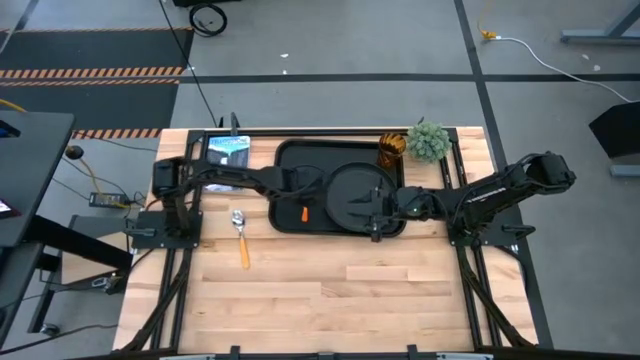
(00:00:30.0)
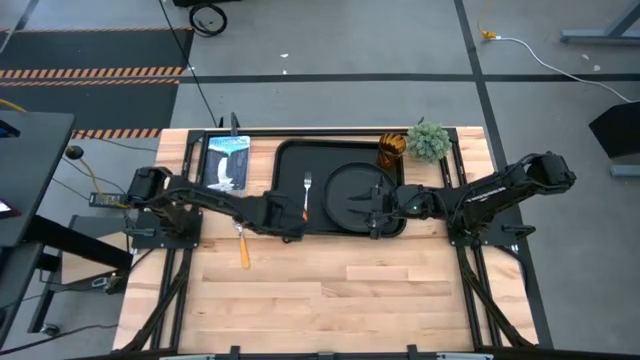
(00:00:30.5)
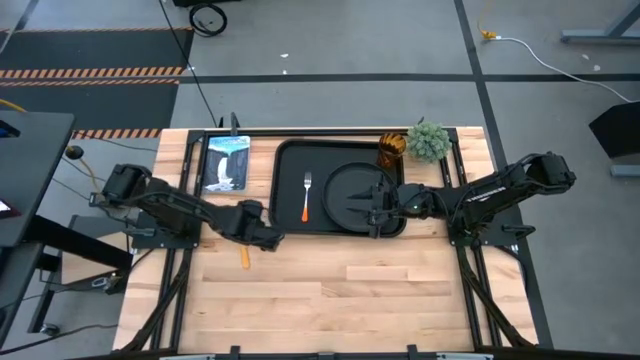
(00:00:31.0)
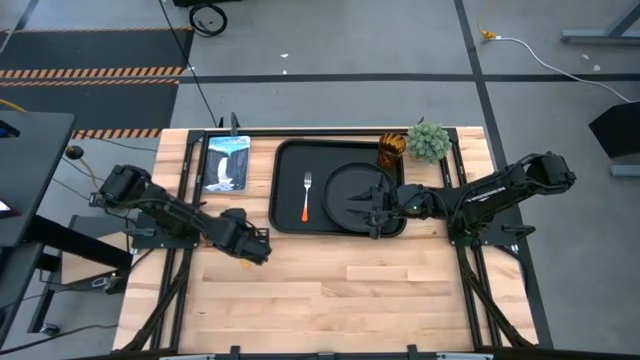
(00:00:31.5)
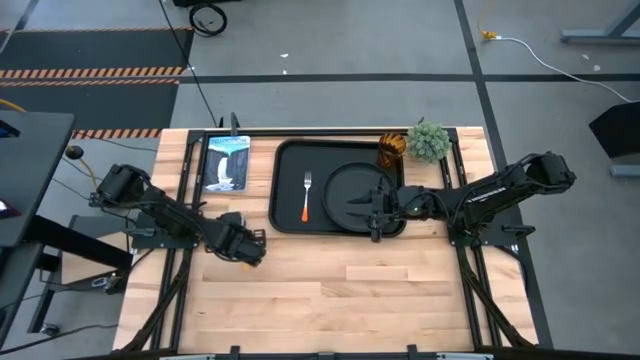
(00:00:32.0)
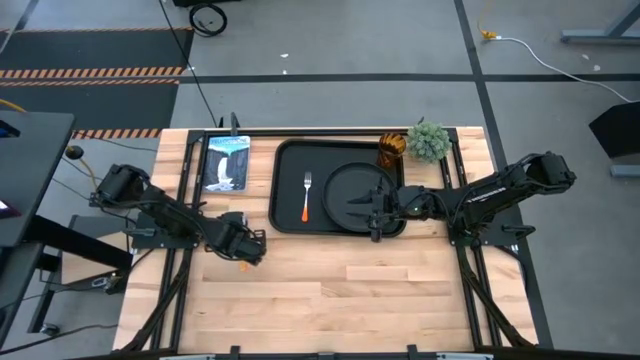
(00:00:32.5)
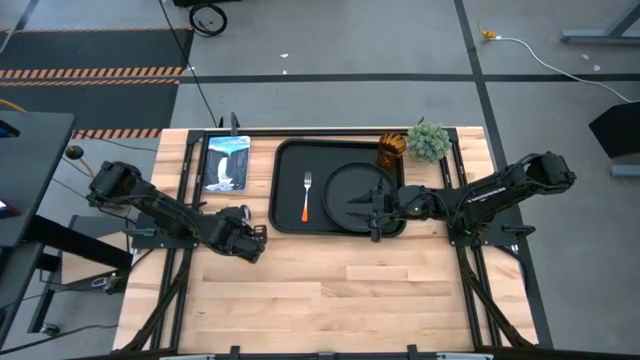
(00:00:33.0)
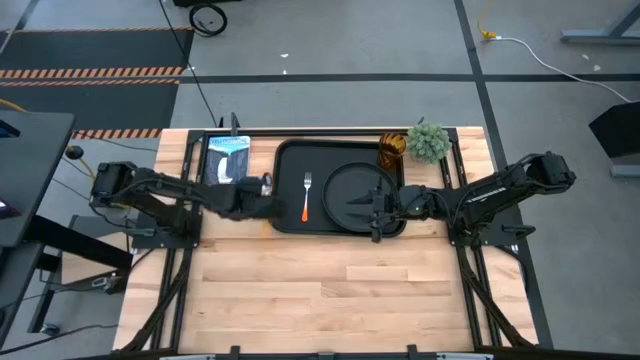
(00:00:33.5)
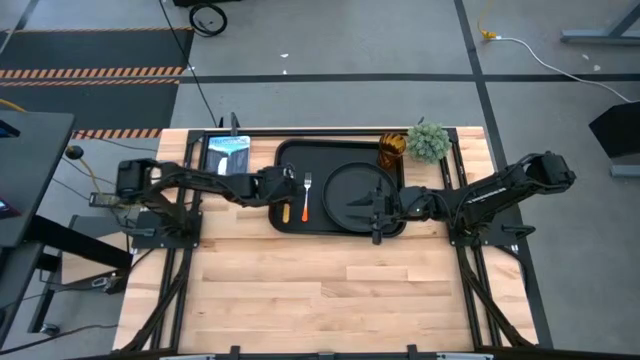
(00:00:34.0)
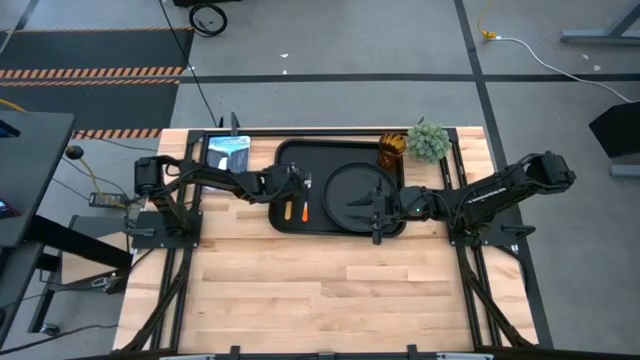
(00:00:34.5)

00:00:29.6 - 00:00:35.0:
Task: Pick and place plate/cup/fork/spoon on tray
Put the spoon on the tray to the left of the fork

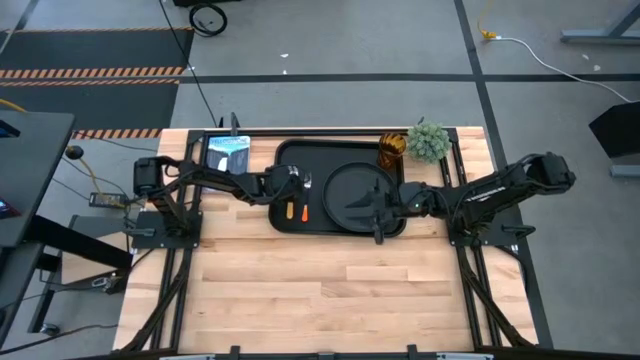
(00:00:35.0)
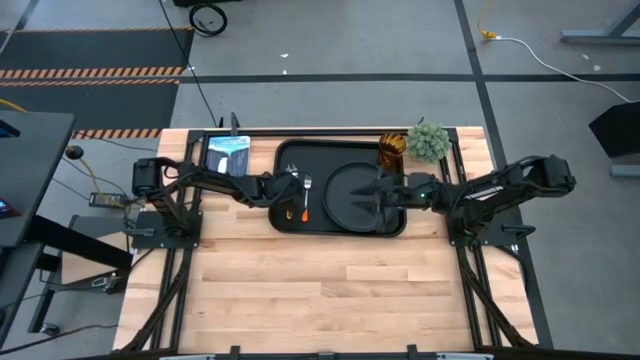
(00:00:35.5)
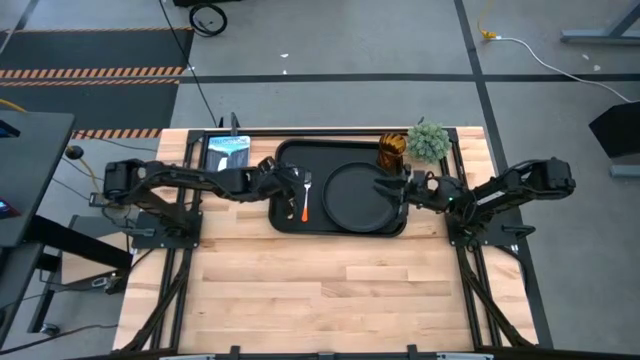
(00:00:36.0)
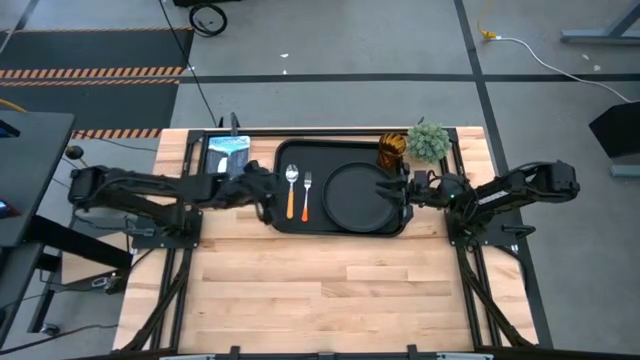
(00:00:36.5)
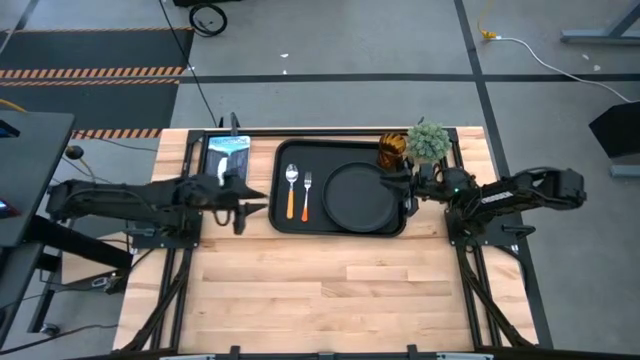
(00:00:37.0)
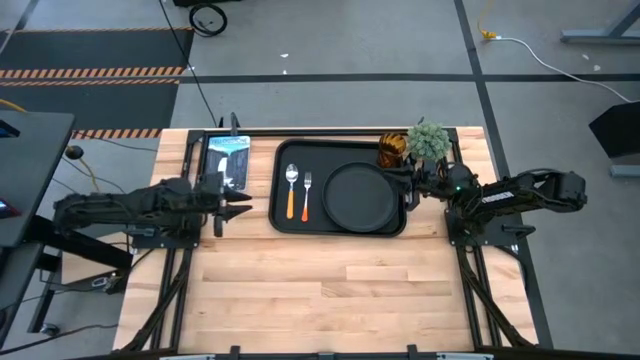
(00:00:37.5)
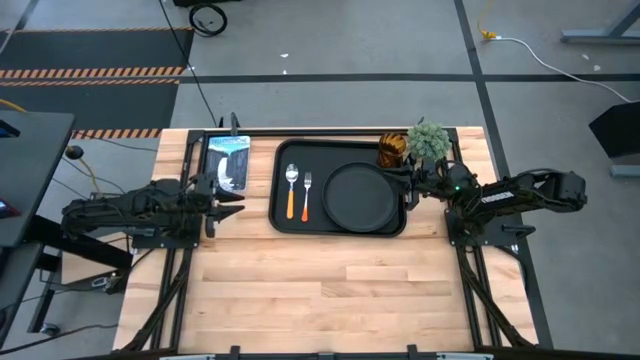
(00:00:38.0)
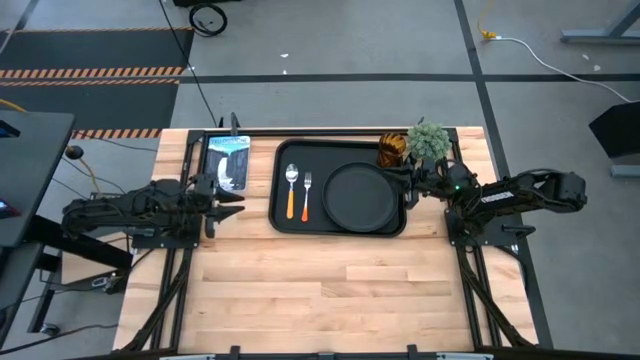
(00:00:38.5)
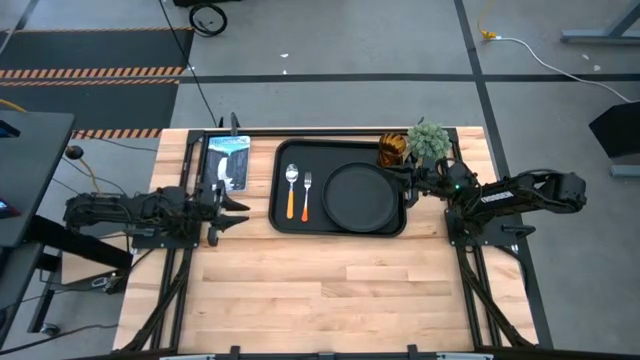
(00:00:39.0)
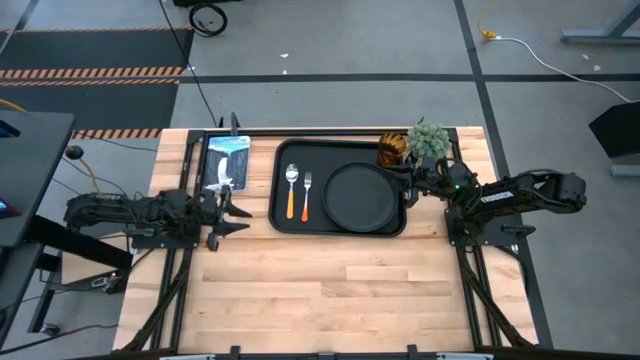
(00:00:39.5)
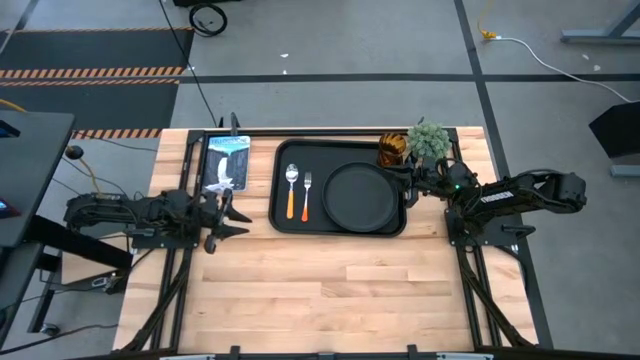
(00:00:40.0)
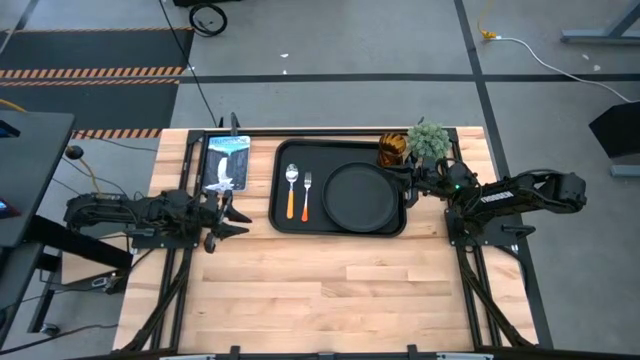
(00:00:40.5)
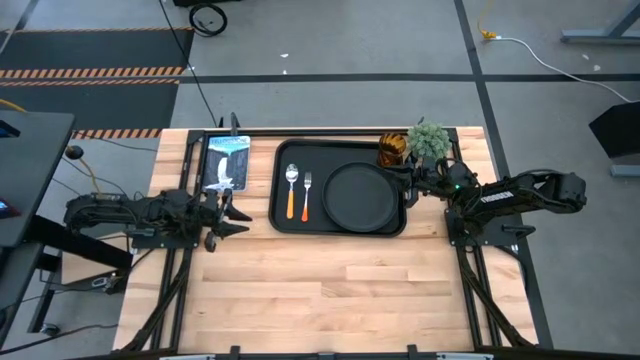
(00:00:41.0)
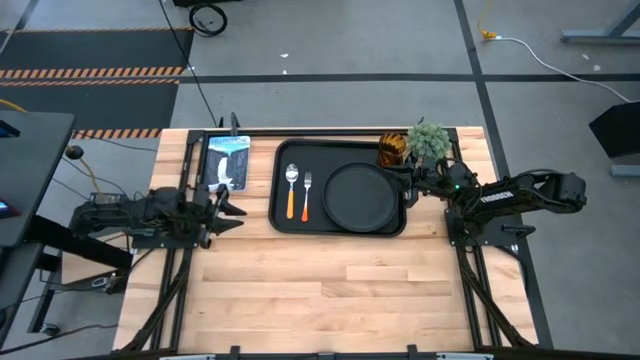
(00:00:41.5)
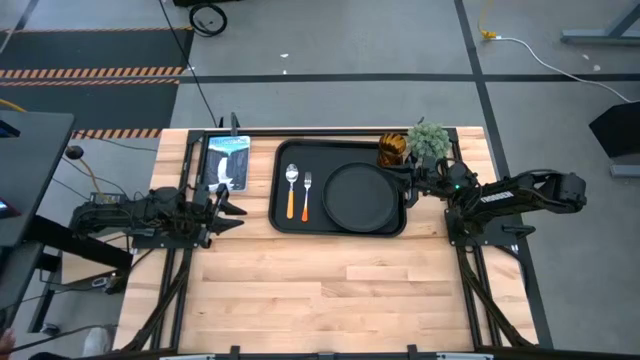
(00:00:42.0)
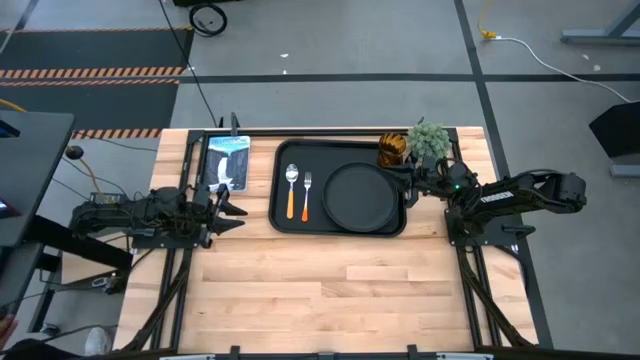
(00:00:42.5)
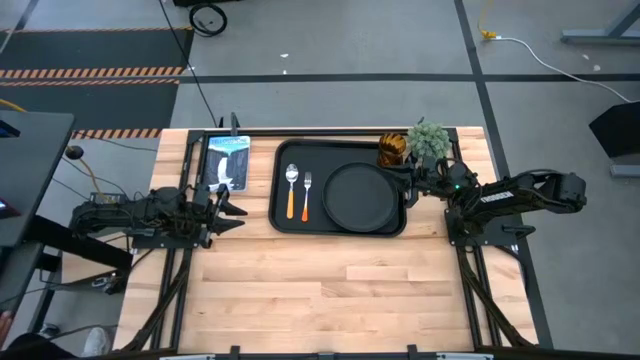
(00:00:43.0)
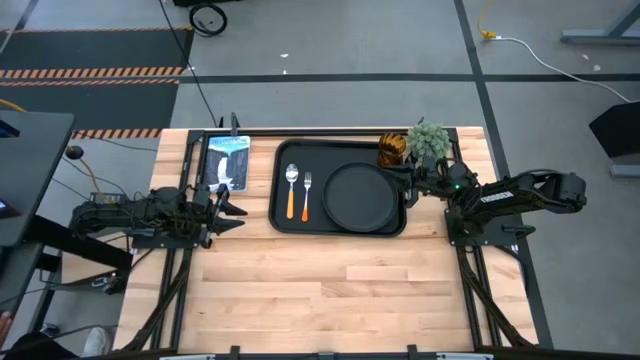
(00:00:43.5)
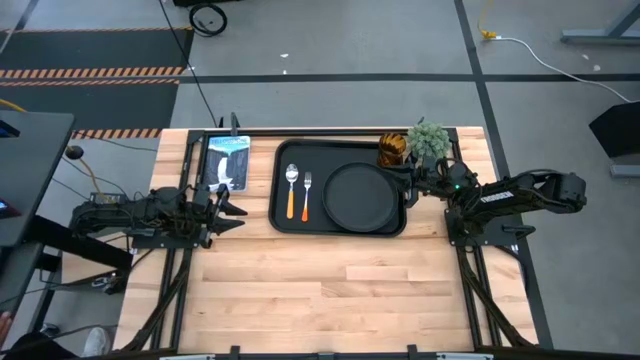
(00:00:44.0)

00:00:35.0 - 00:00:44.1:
Return to Home Position

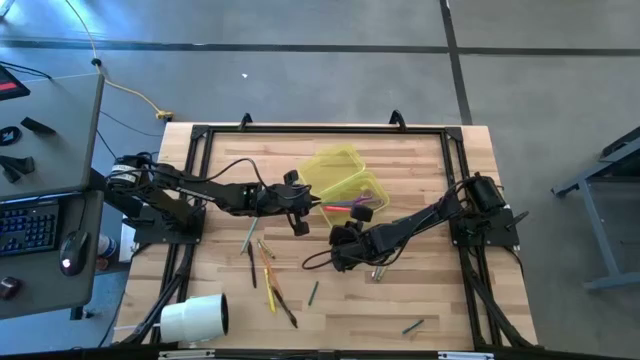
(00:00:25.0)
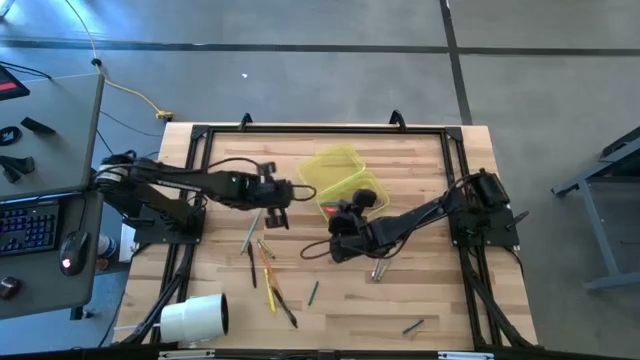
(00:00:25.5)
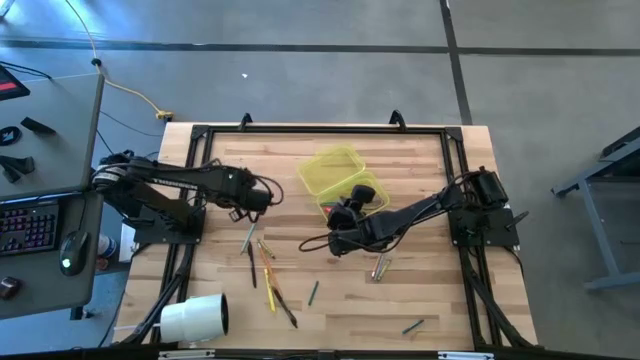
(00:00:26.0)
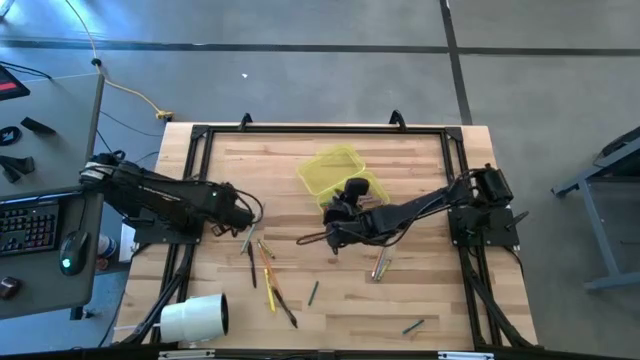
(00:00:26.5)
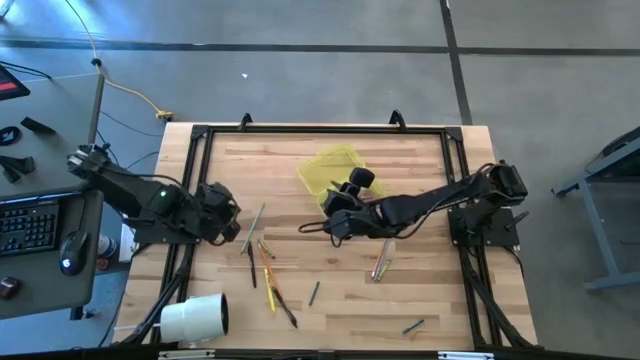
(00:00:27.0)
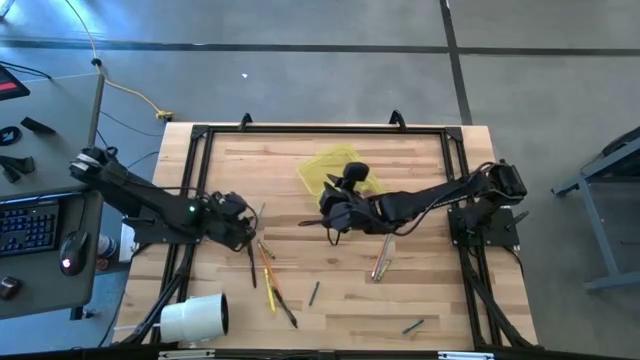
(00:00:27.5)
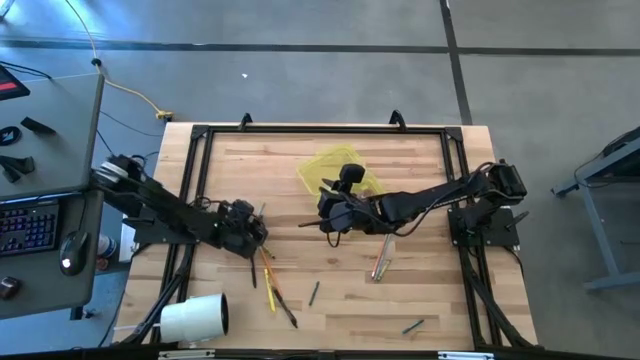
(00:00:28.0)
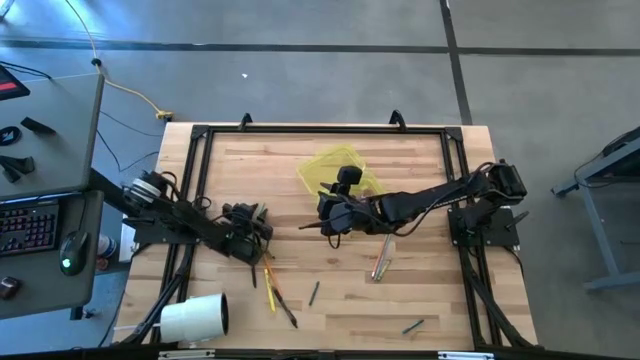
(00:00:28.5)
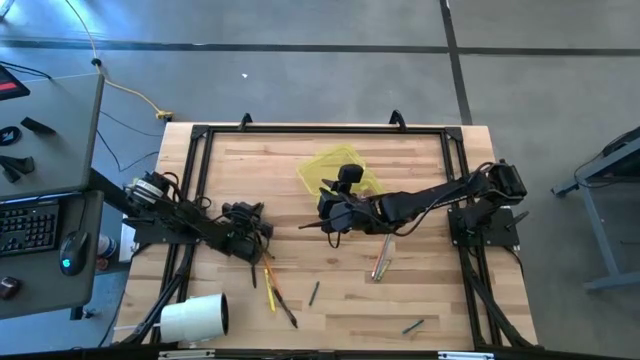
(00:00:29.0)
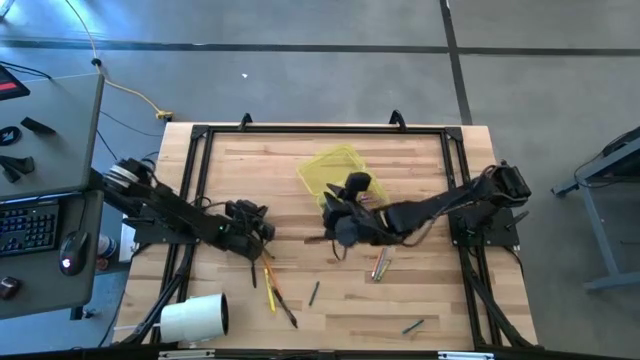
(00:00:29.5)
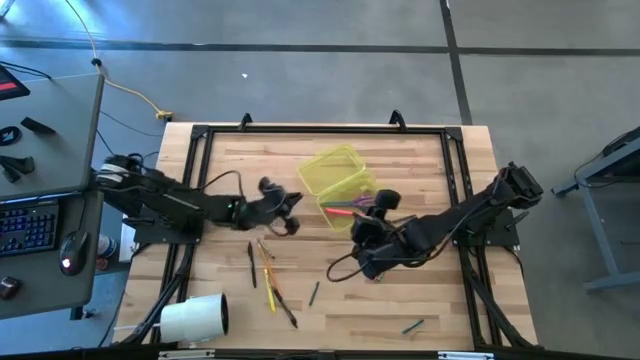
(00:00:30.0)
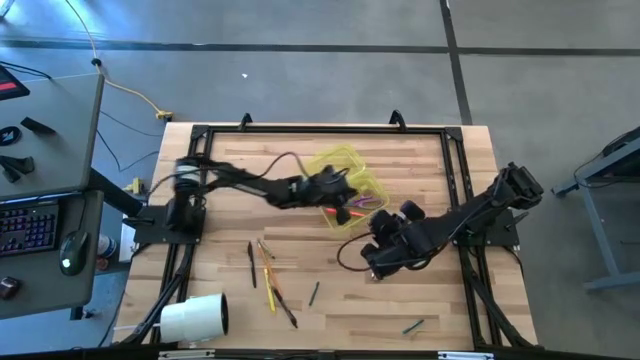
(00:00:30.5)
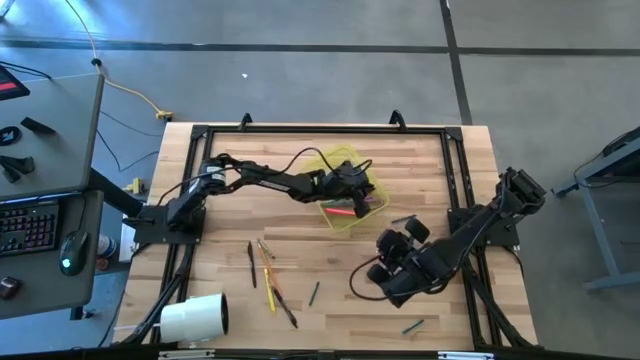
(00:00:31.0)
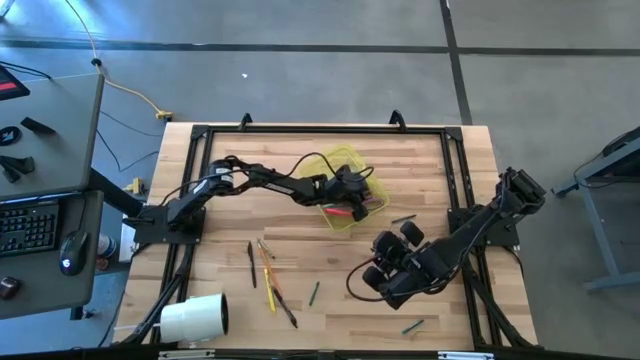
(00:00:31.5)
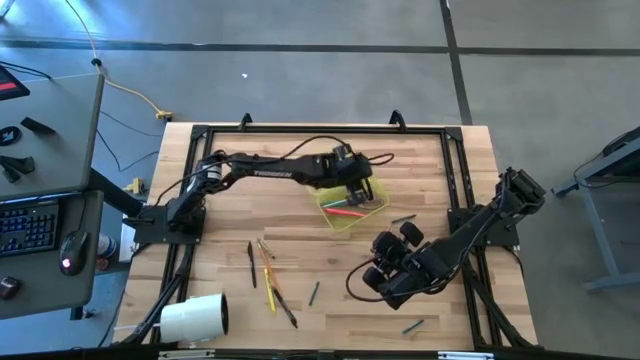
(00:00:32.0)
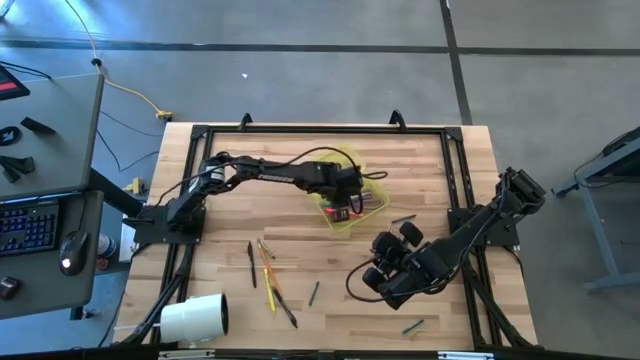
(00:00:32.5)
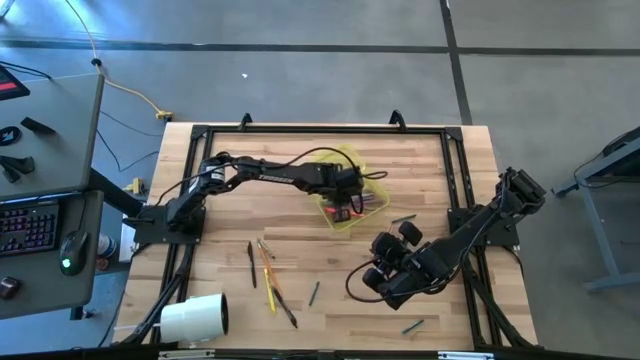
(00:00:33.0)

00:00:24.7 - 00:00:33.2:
Task: Pick & place school supplies into a supply box
Put the green pencil into the supply box
